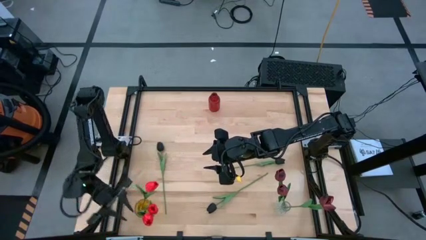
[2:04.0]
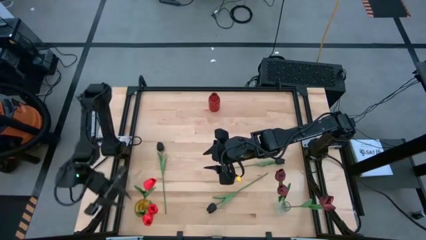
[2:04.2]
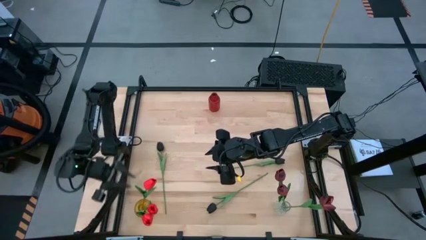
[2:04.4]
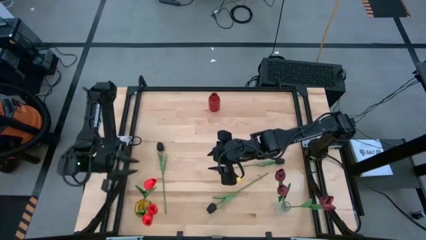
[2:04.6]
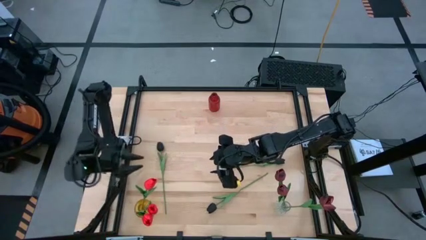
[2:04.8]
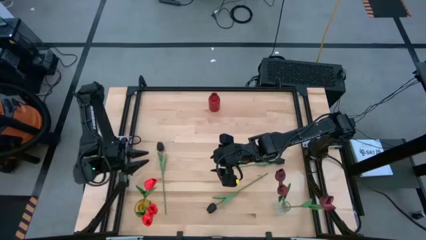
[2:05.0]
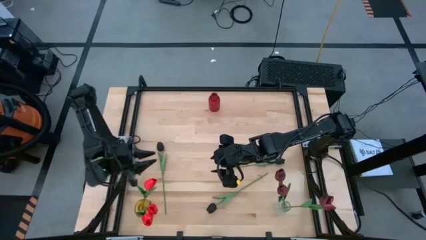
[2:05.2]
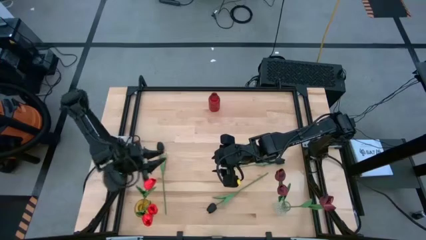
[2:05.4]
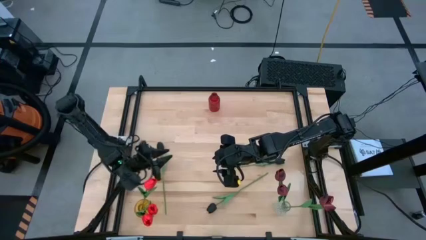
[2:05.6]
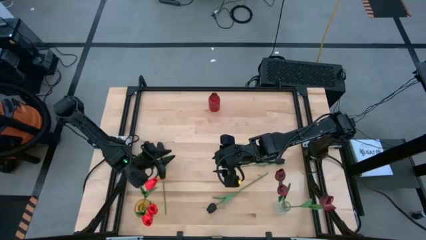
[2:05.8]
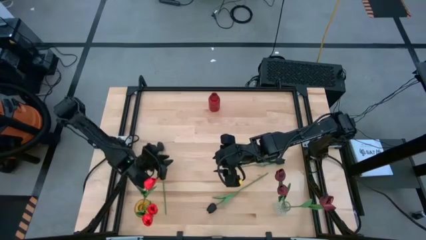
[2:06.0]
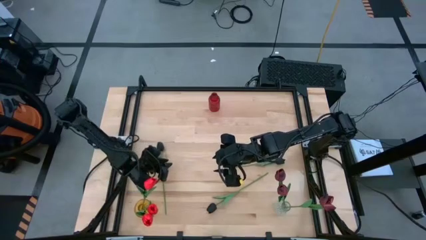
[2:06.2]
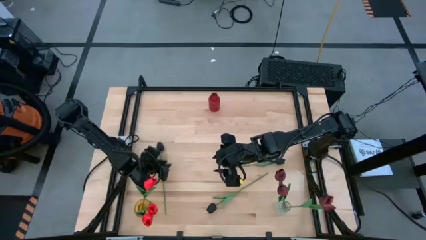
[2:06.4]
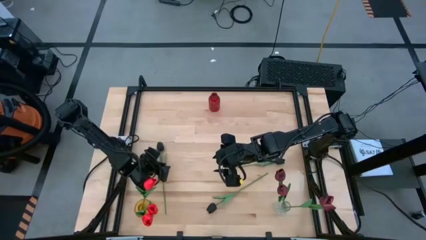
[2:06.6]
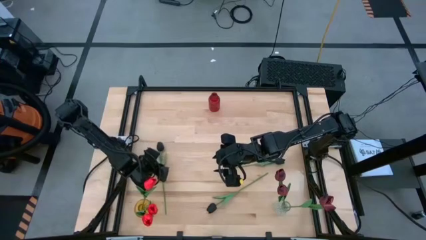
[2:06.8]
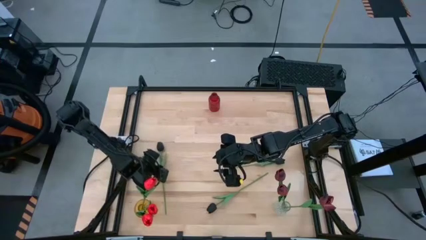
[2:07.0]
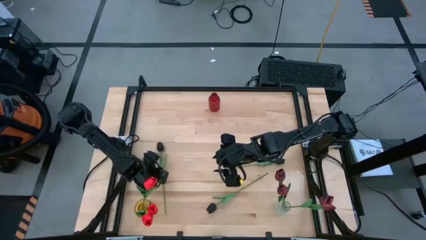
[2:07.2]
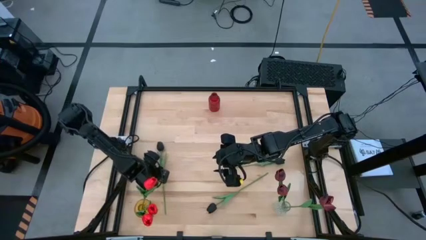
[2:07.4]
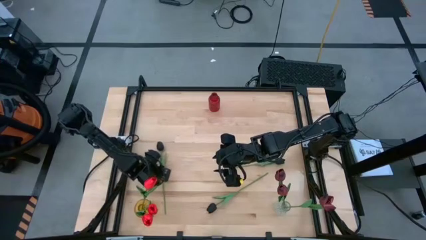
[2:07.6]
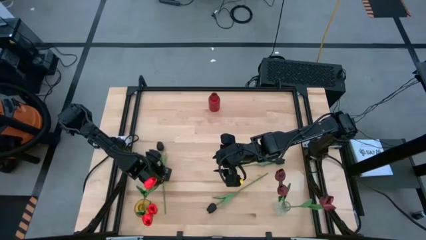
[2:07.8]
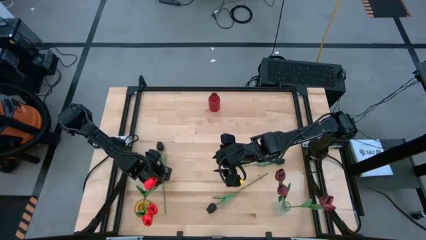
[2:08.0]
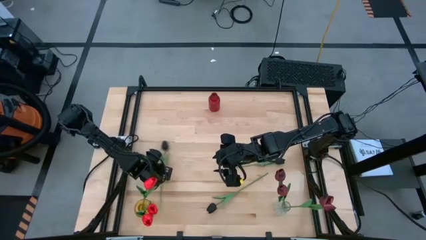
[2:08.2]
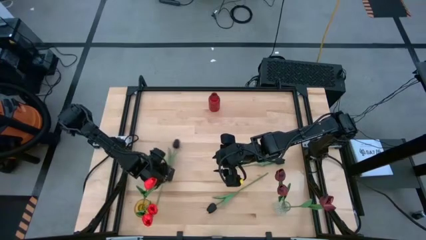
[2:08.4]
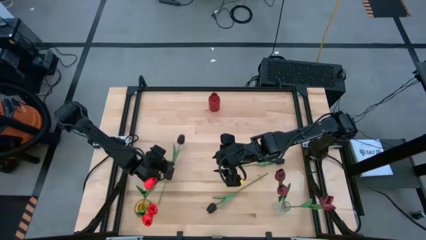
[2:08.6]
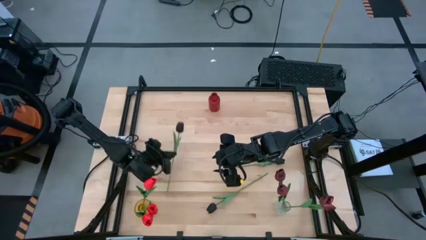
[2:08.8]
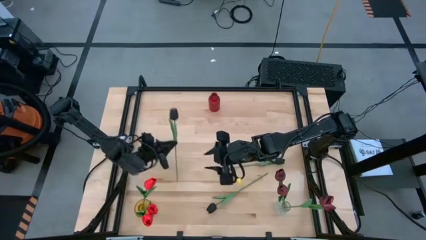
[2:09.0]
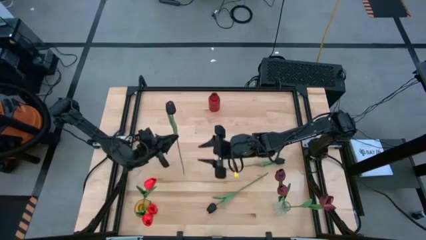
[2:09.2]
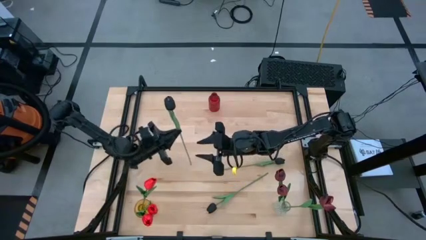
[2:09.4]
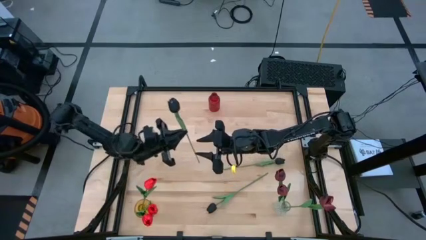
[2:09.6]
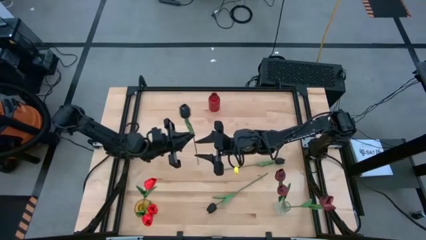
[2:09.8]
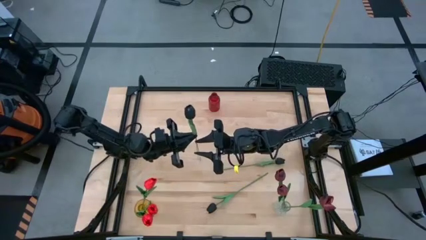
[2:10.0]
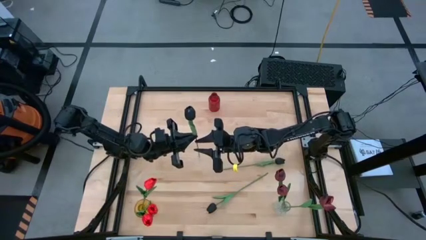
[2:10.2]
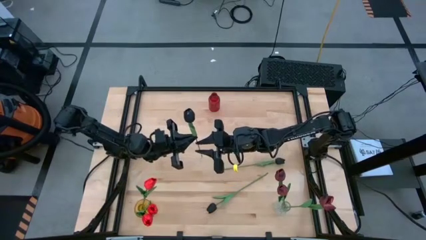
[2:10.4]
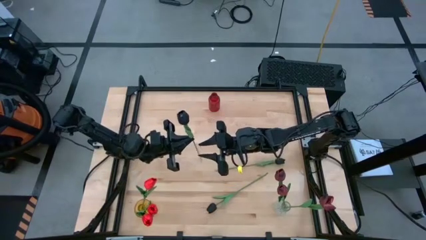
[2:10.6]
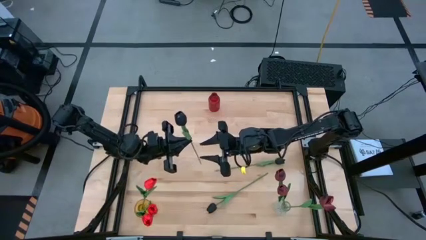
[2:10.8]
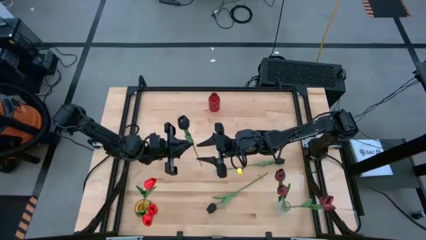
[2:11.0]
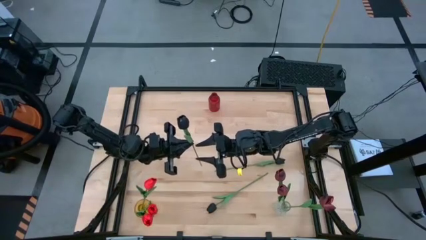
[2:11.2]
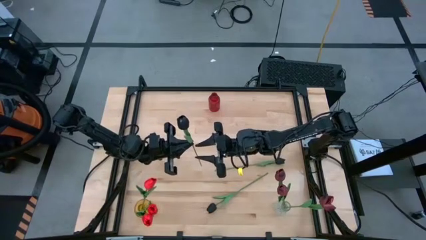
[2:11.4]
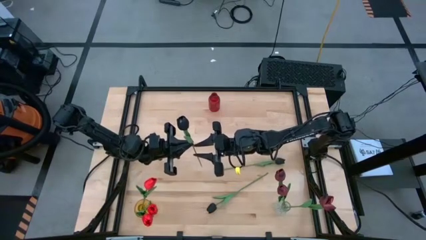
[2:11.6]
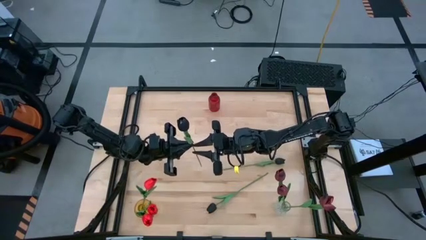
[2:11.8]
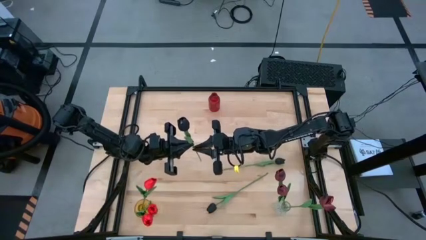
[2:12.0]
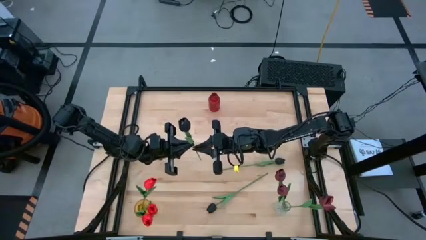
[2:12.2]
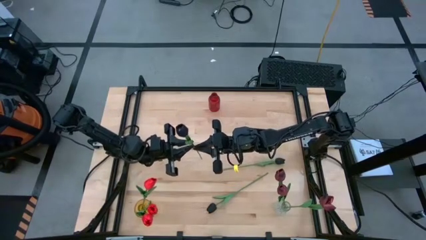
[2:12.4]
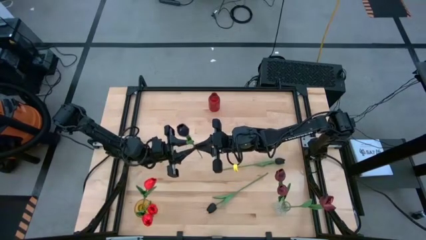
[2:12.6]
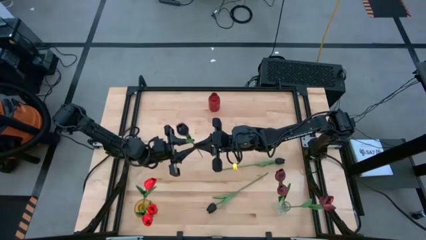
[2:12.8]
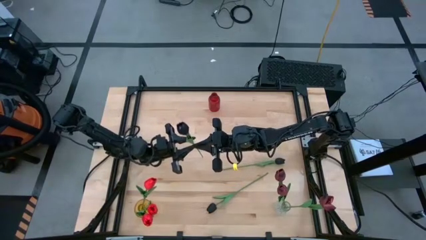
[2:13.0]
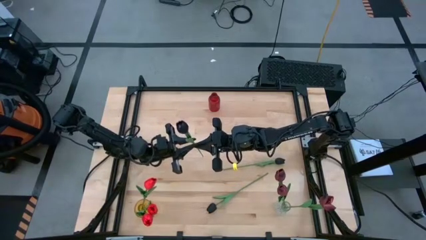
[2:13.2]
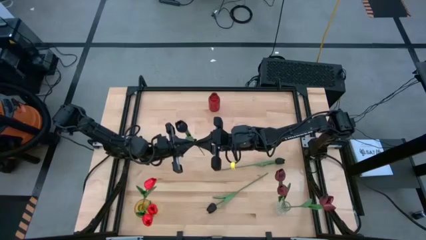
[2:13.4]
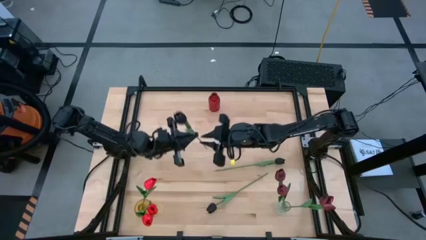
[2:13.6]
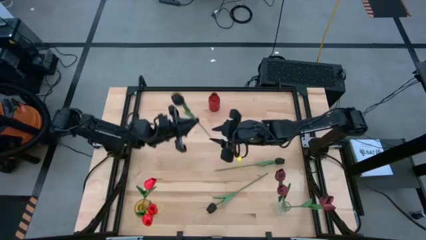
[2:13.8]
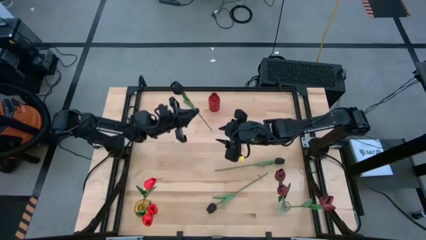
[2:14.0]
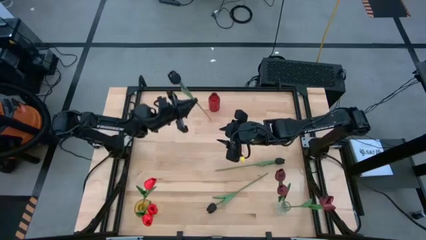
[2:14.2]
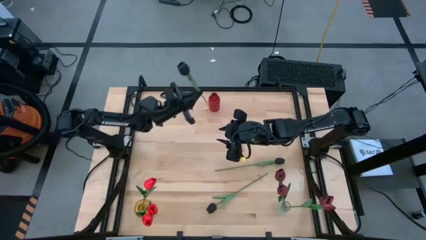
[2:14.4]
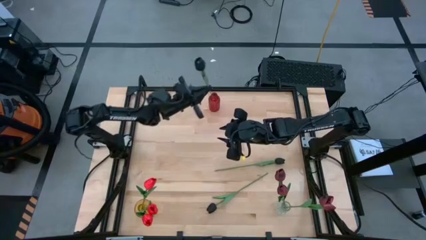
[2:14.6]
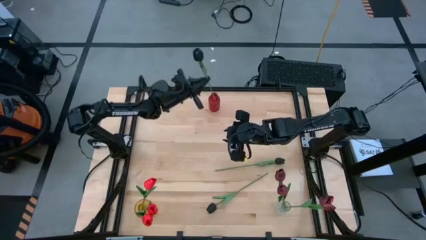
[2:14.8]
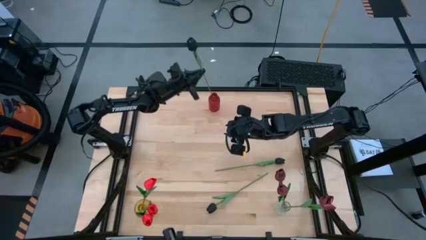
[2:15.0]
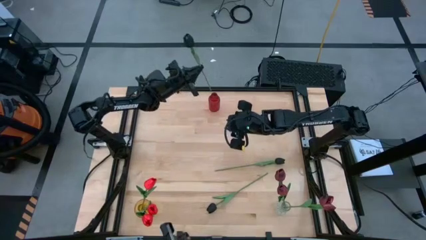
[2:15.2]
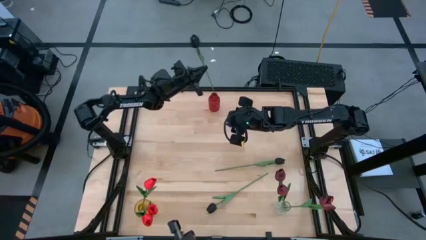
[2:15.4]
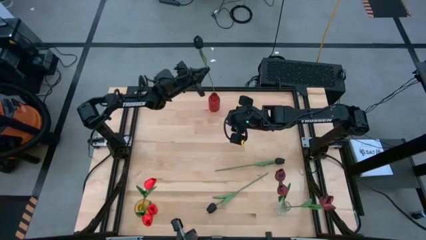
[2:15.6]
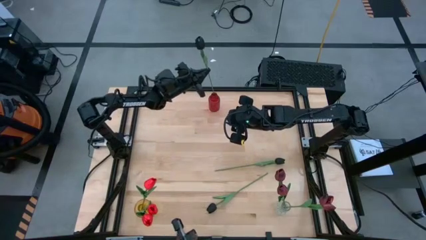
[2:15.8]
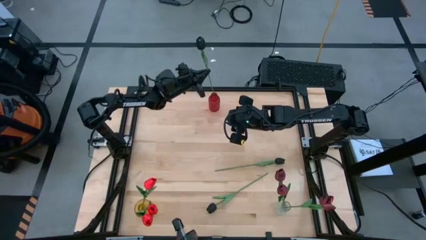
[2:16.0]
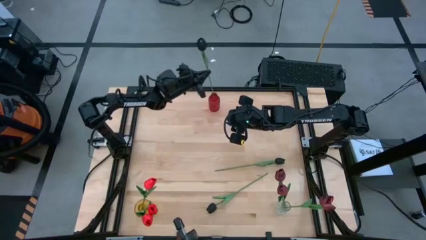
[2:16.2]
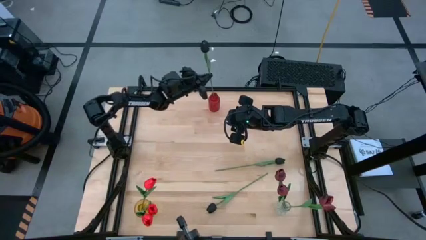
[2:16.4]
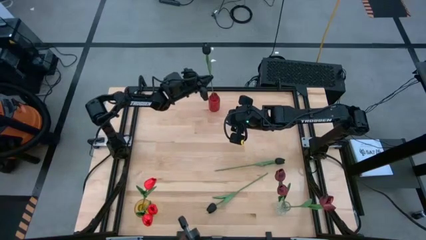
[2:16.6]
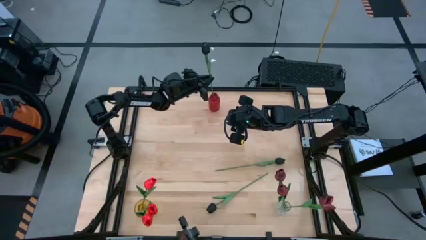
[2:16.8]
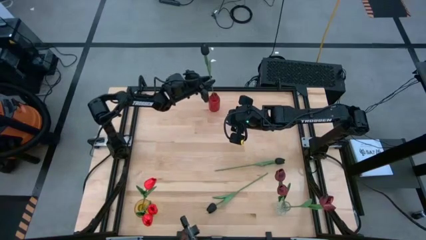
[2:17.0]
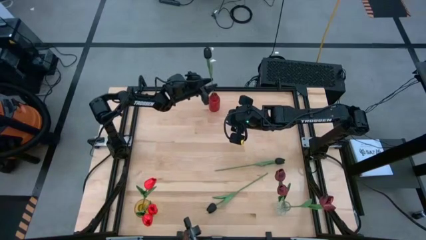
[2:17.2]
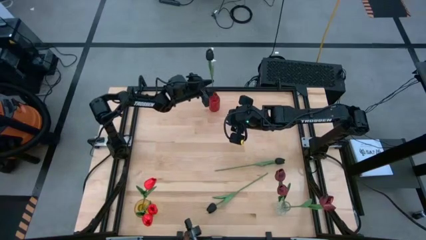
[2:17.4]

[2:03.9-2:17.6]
Task: Sort flowers into vase by color
Put the top left black flower into the red vase

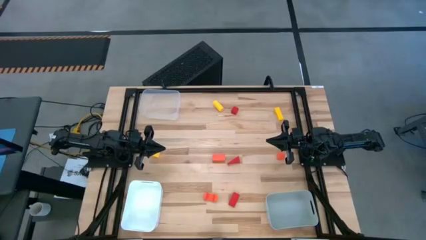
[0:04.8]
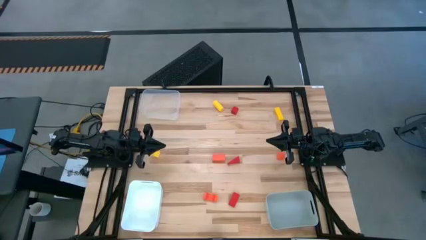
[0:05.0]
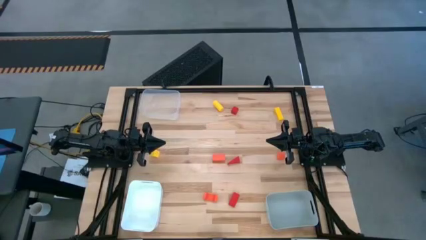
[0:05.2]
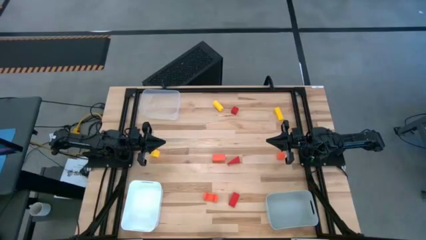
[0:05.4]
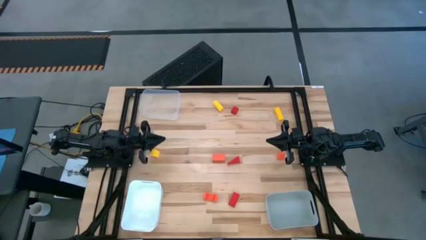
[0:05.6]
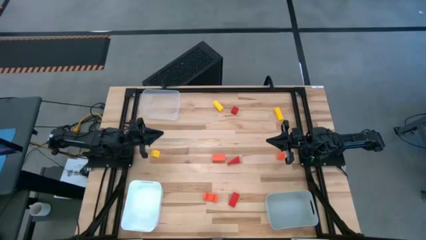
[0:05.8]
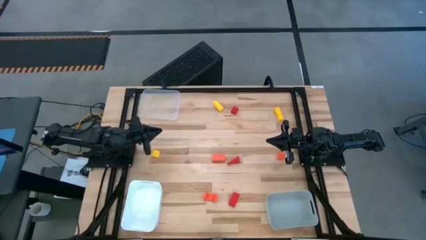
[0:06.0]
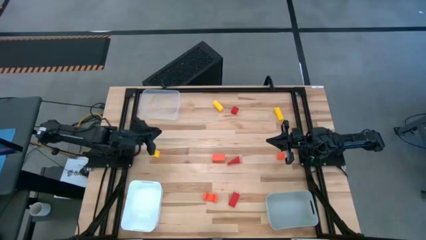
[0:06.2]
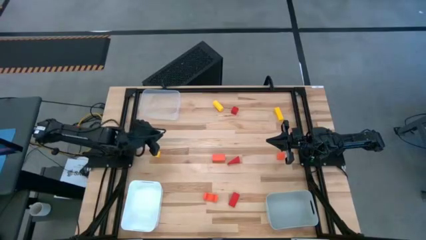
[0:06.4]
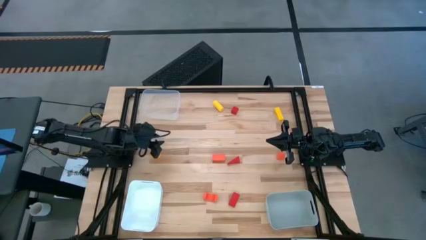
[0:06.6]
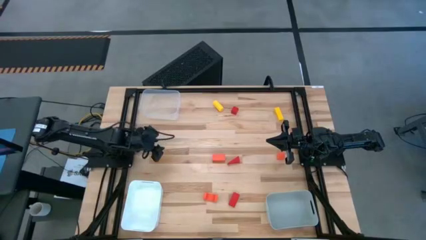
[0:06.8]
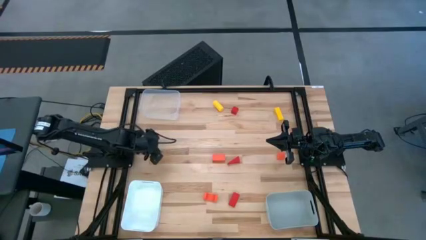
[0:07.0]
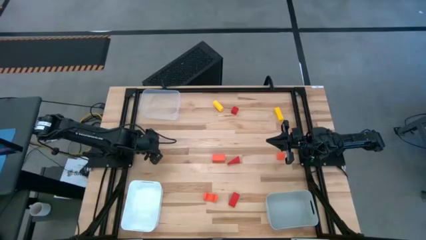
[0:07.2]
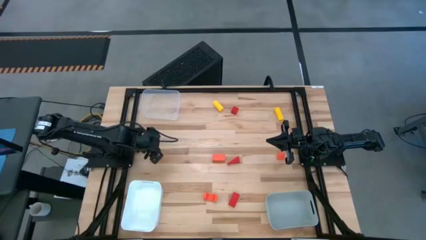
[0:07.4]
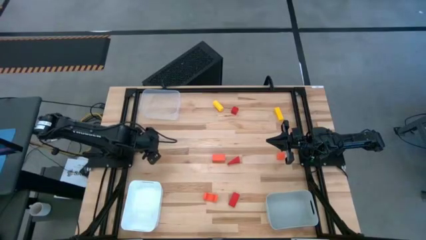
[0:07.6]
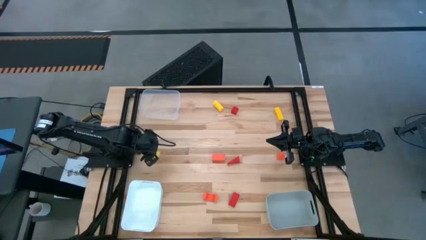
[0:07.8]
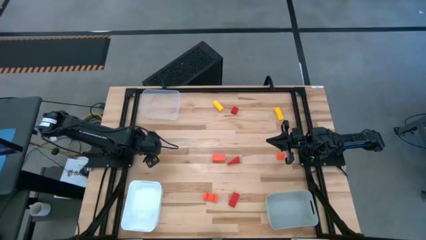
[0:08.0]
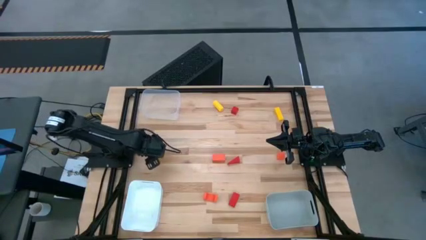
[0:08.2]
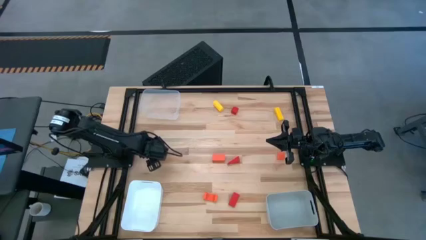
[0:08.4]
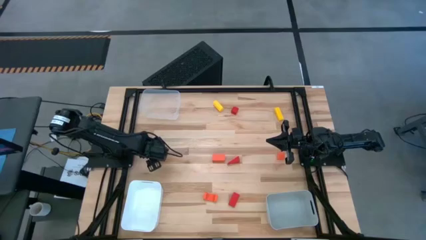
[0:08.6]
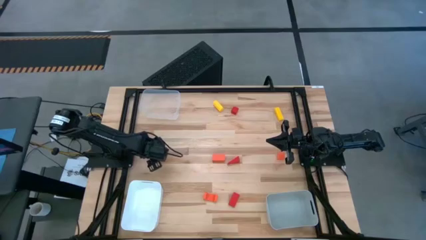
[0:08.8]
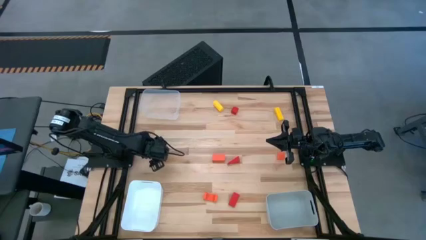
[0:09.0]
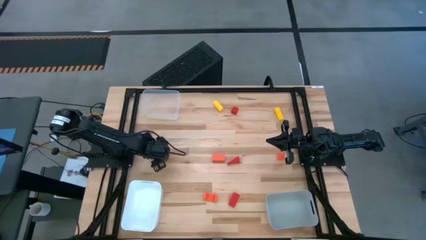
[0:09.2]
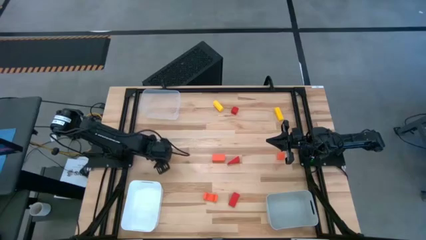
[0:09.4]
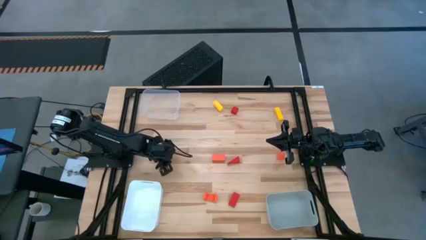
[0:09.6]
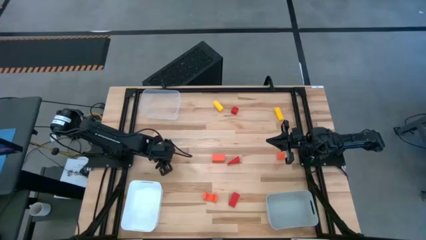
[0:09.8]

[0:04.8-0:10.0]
Task: Sort & place blocks by color
Put the left yellow block into the white bin
